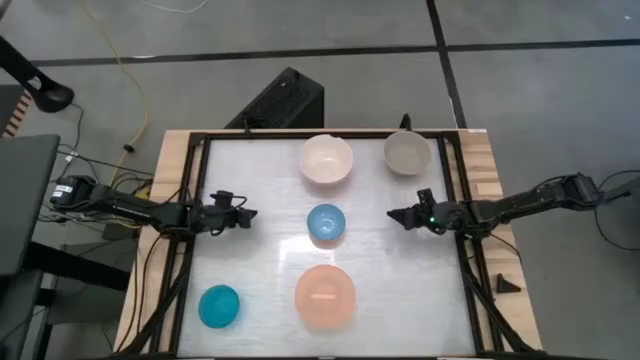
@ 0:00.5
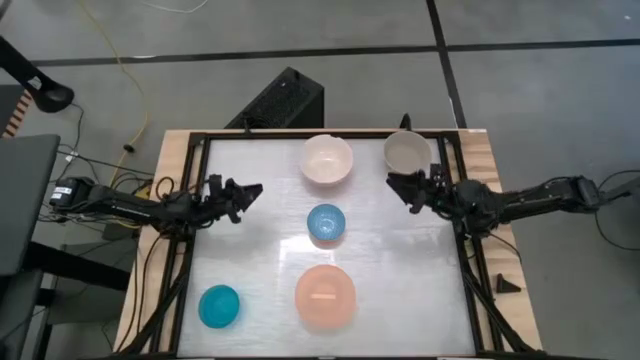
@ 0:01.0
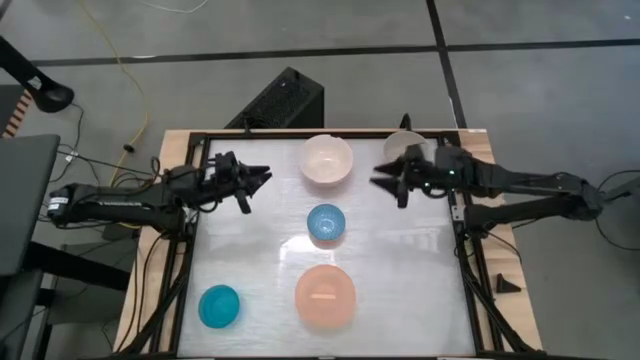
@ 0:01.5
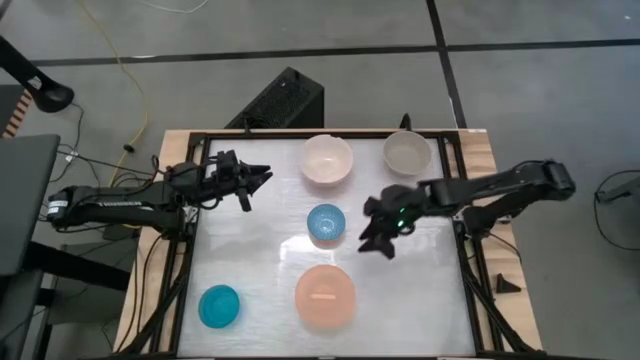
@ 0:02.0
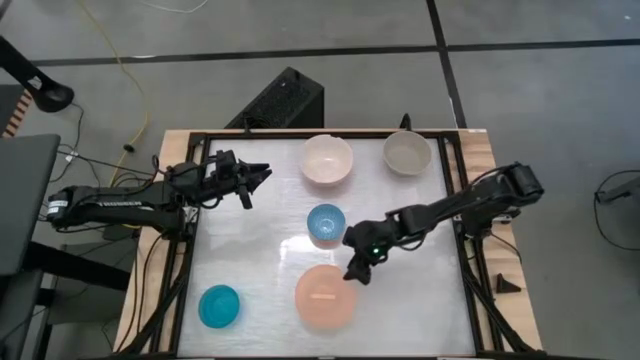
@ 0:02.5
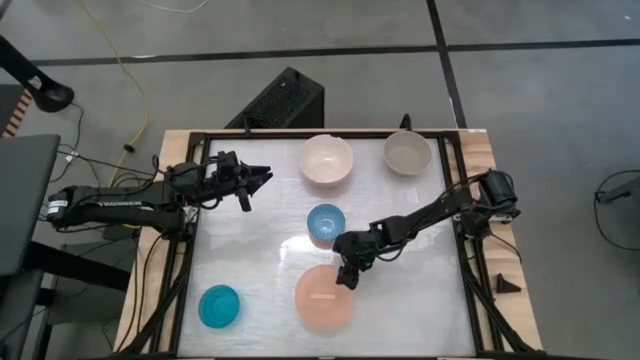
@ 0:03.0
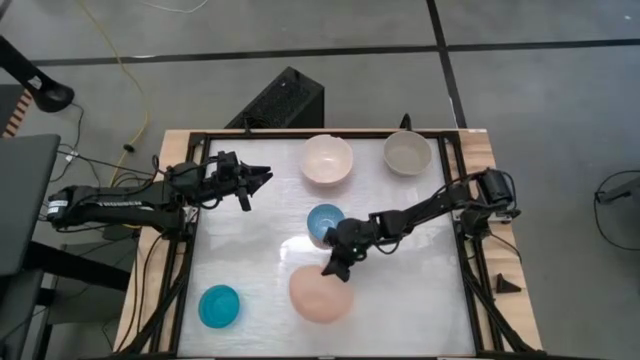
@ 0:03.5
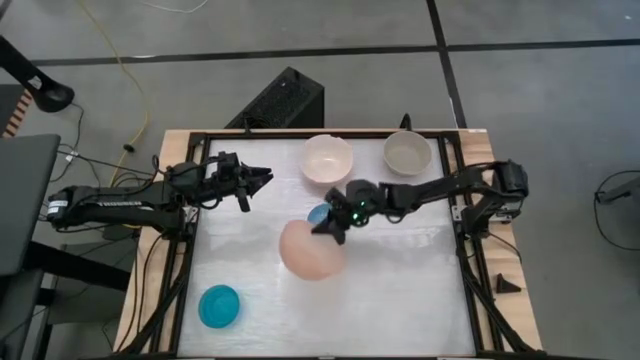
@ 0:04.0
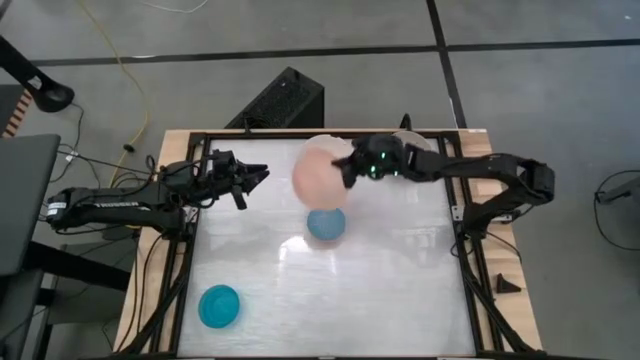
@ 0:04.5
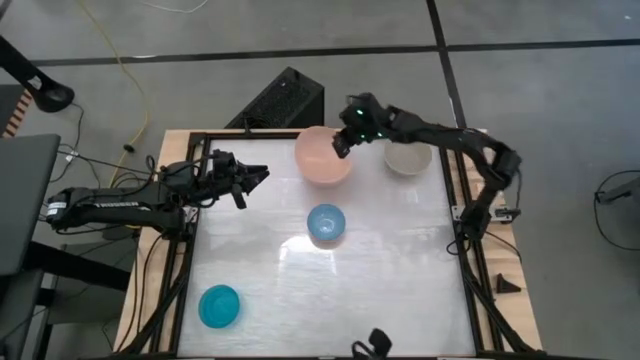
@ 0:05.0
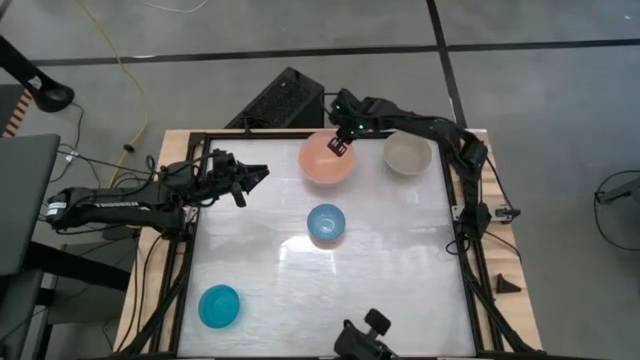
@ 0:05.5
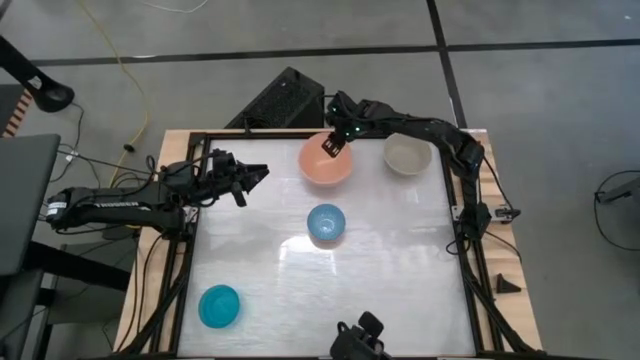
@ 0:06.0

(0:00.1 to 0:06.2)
Stack the light orange bowl on top of the white bowl

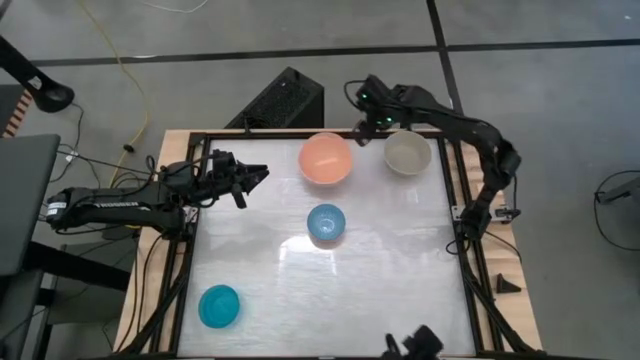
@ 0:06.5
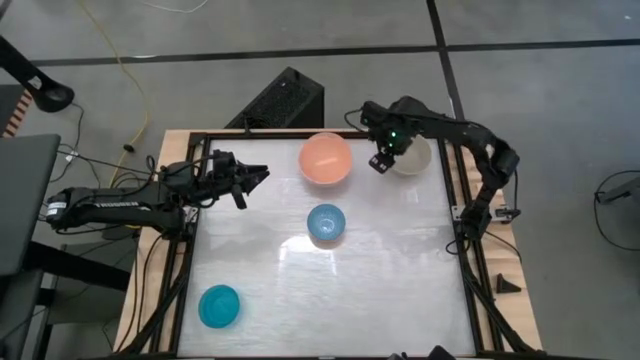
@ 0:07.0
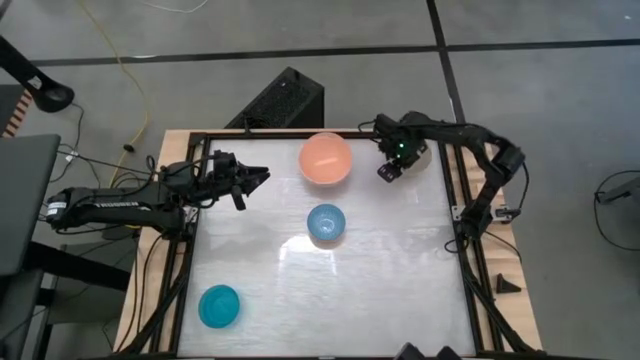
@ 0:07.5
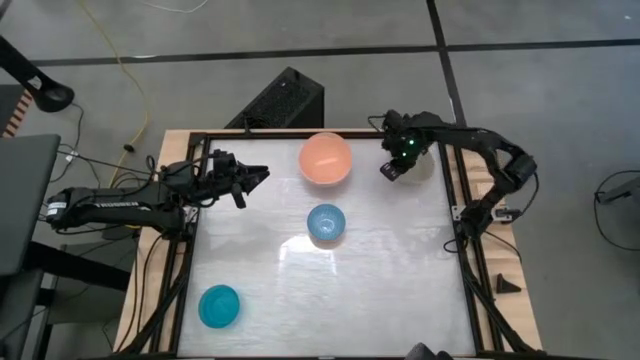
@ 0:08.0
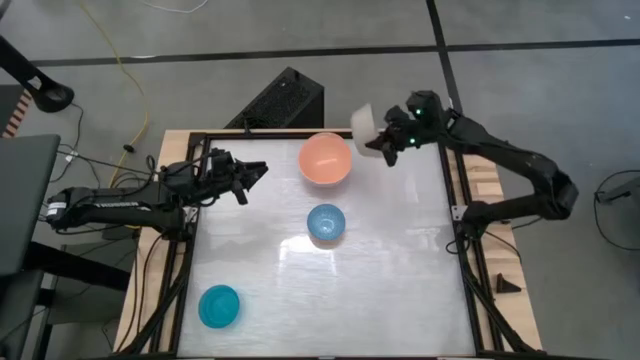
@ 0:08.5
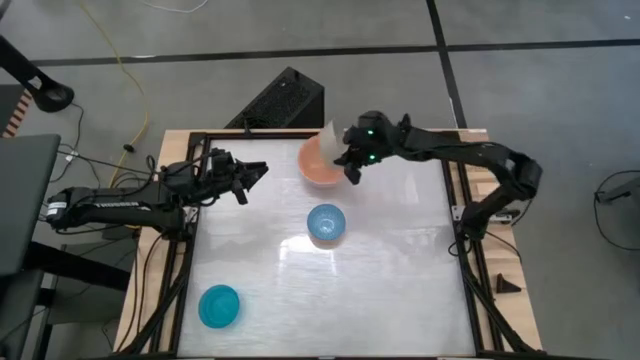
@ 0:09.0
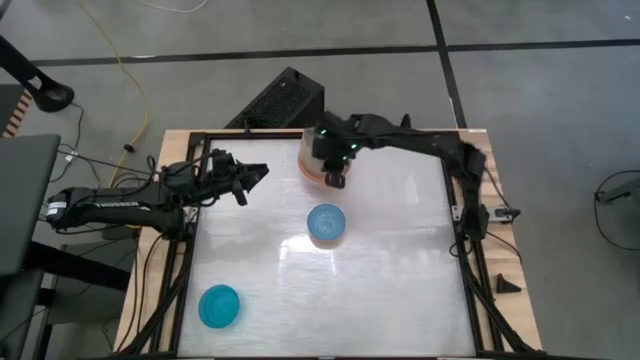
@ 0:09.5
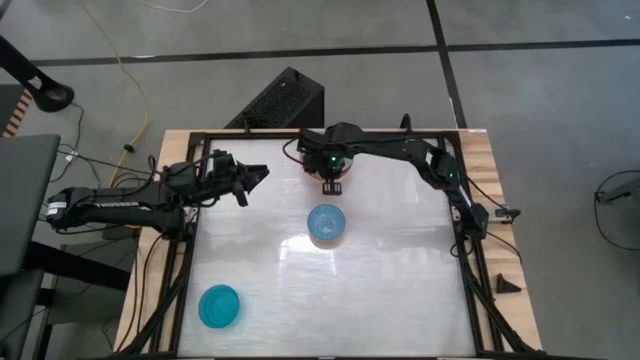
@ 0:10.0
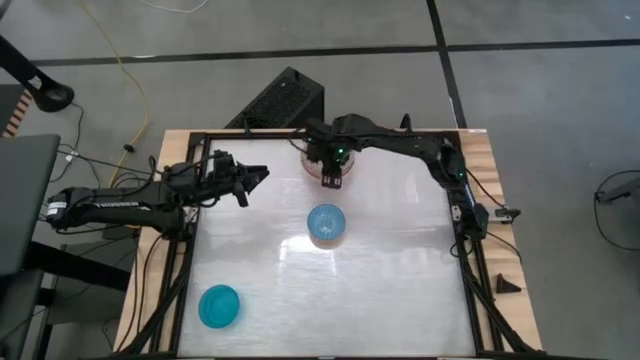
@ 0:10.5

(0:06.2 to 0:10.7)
Stack the gray bowl on top of the light orange bowl

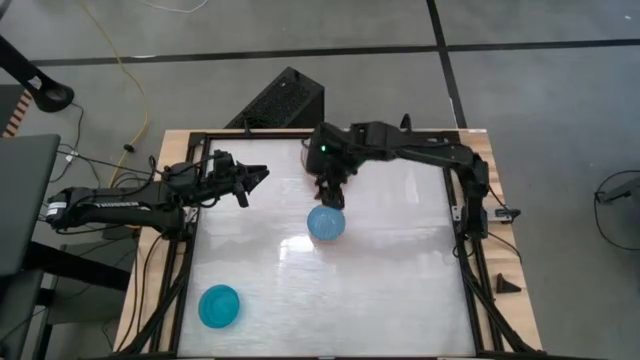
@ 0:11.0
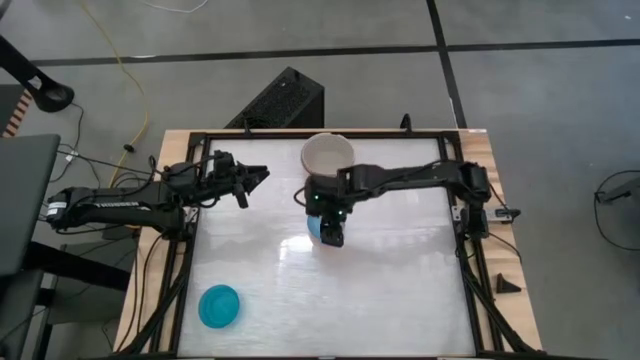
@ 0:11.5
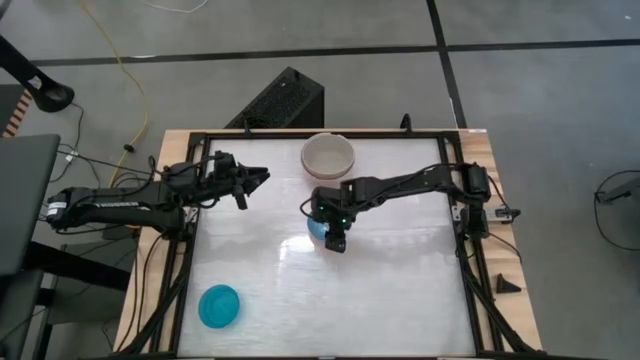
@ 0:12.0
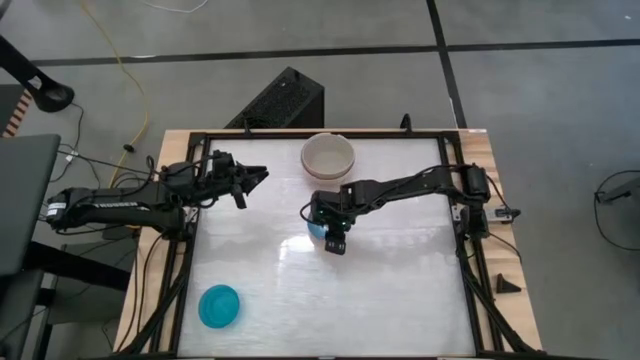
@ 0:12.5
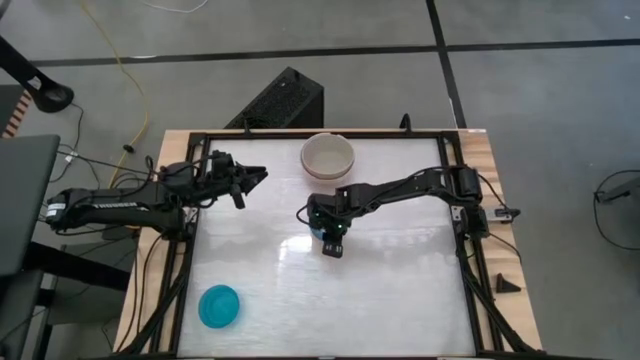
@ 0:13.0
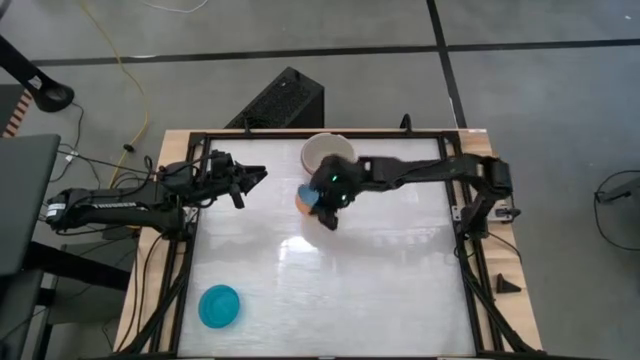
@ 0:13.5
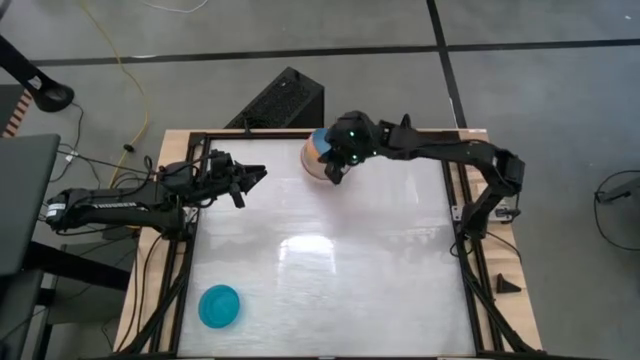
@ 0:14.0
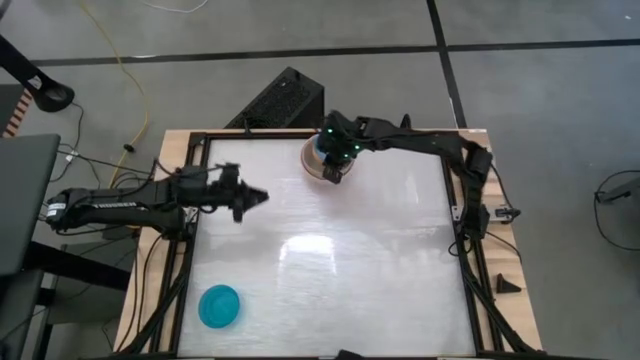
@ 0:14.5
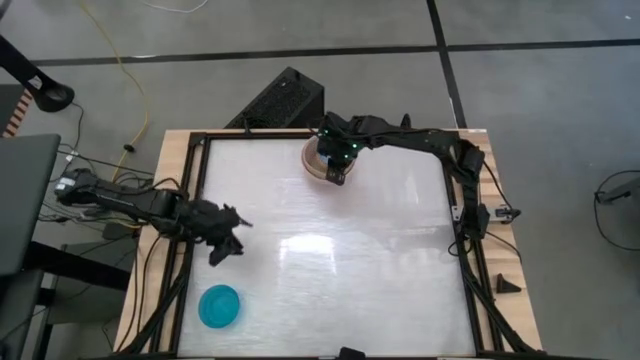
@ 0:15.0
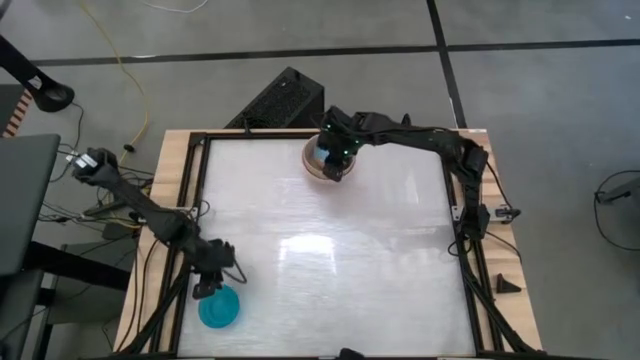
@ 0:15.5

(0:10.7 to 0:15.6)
Stack the blue patterned bowl on top of the grey bowl

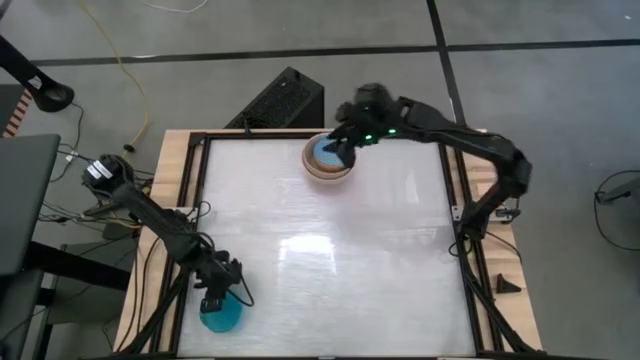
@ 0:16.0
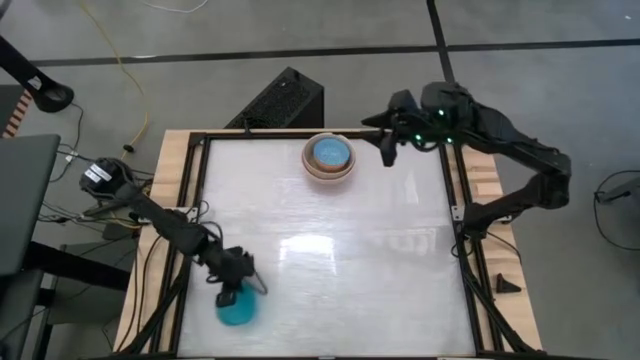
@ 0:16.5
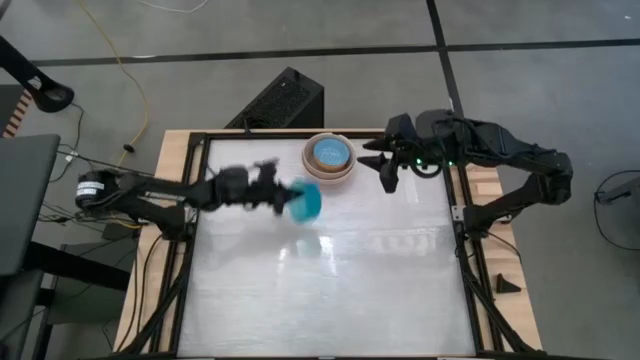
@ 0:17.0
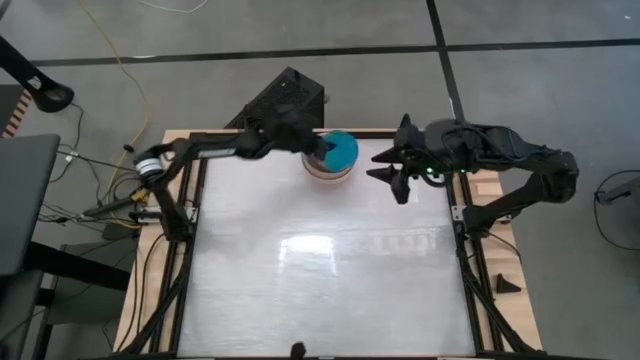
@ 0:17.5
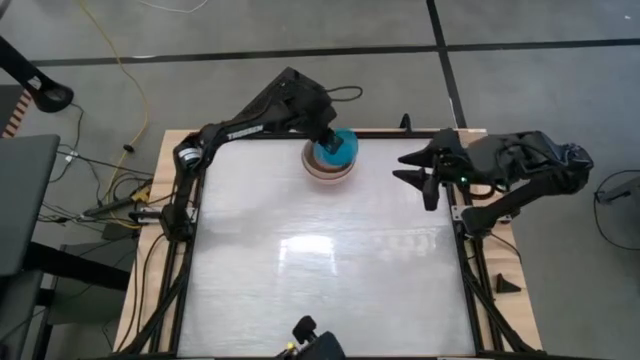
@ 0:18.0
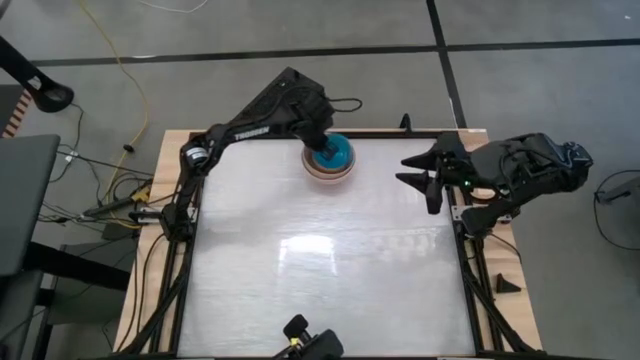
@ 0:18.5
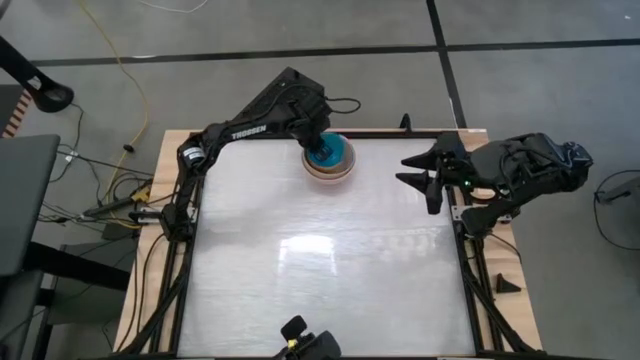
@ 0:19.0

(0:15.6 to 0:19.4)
Stack the blue bowl on top of the blue patterned bowl

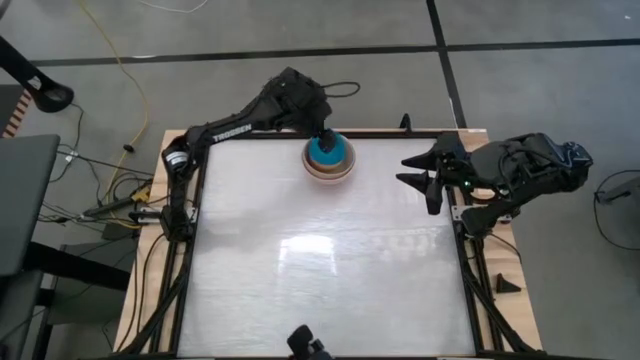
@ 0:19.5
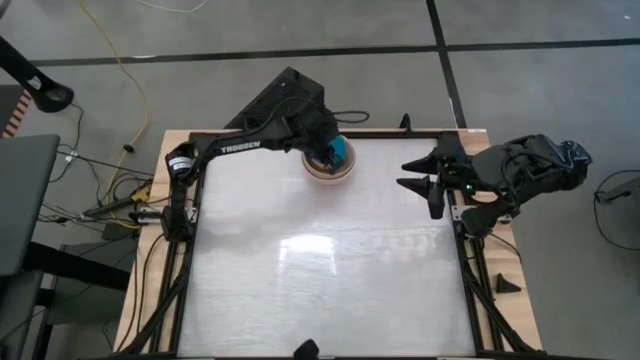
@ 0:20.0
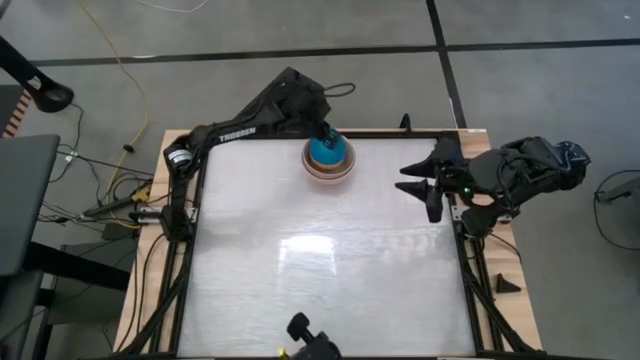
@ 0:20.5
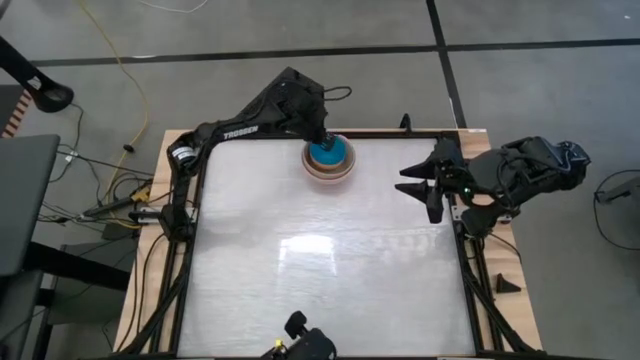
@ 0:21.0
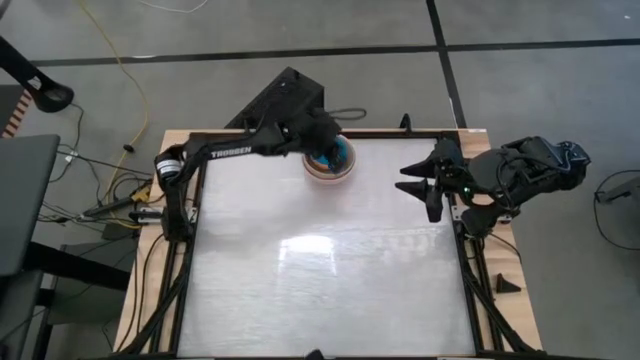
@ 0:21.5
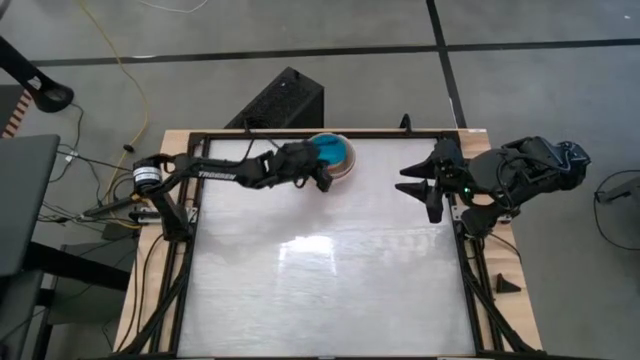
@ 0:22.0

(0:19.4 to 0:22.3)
Adjust the stacked bowls
